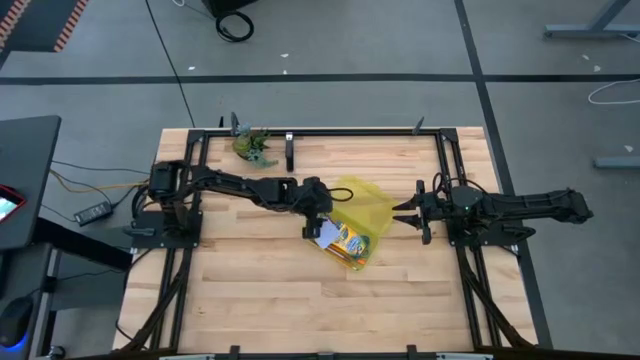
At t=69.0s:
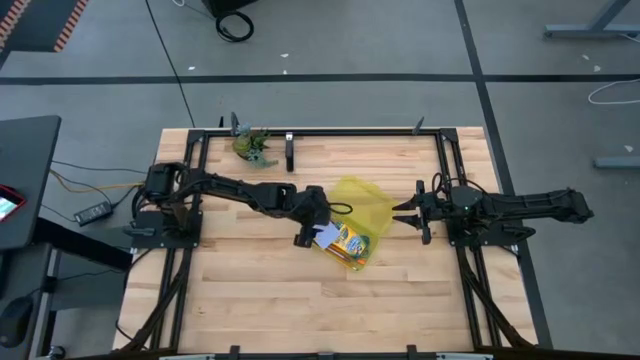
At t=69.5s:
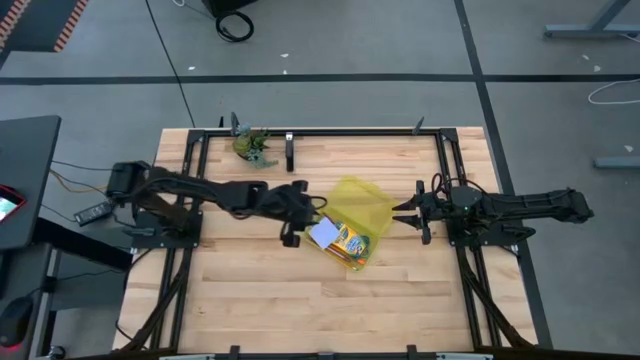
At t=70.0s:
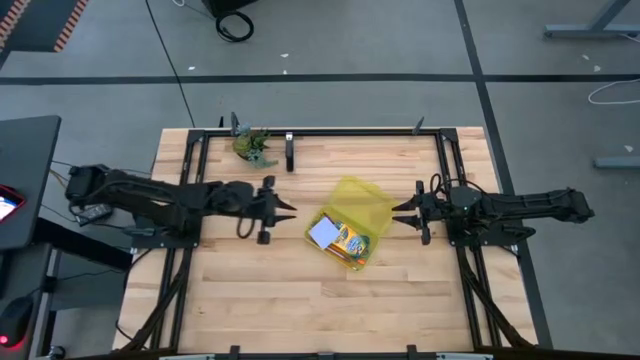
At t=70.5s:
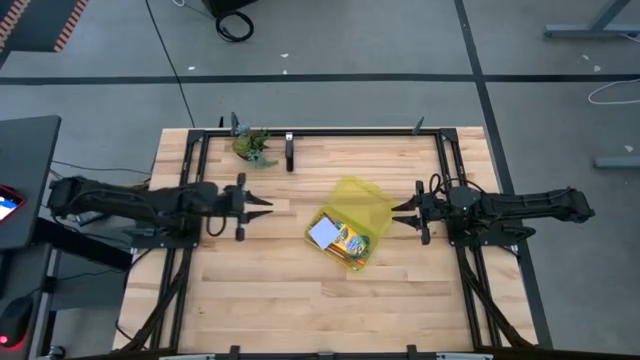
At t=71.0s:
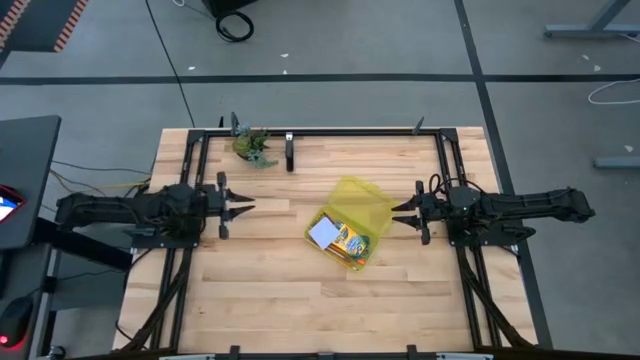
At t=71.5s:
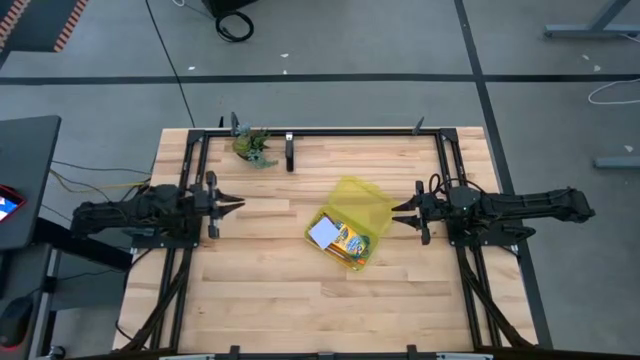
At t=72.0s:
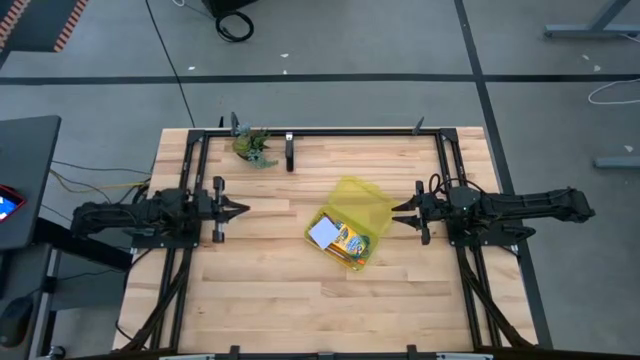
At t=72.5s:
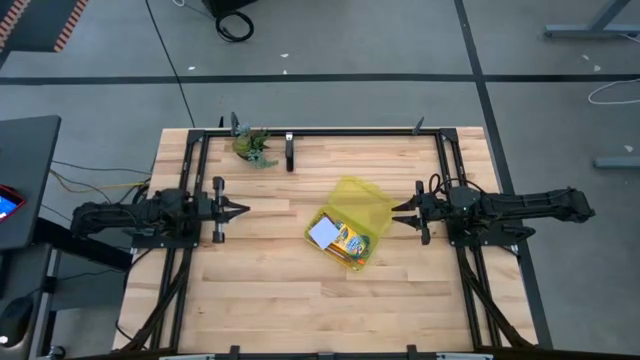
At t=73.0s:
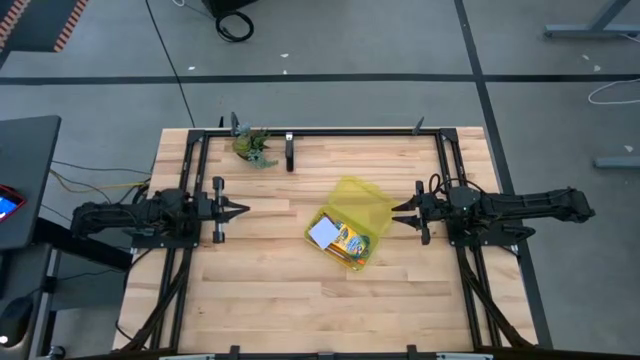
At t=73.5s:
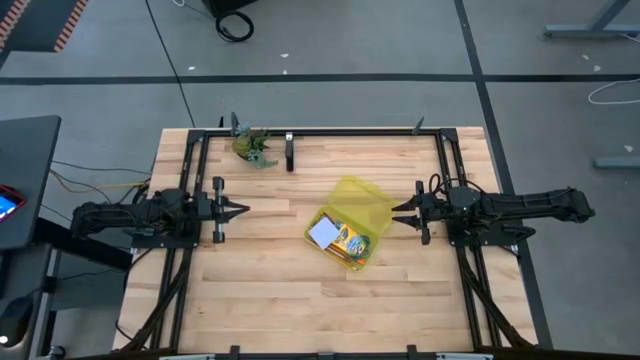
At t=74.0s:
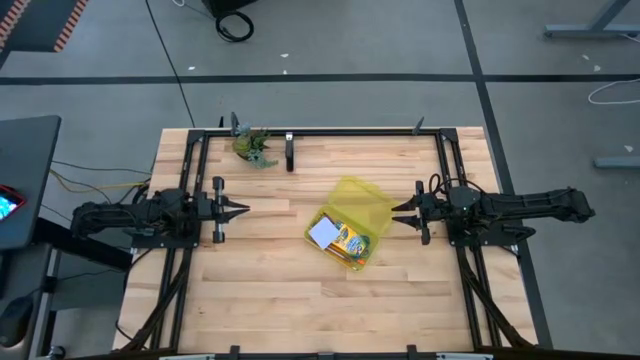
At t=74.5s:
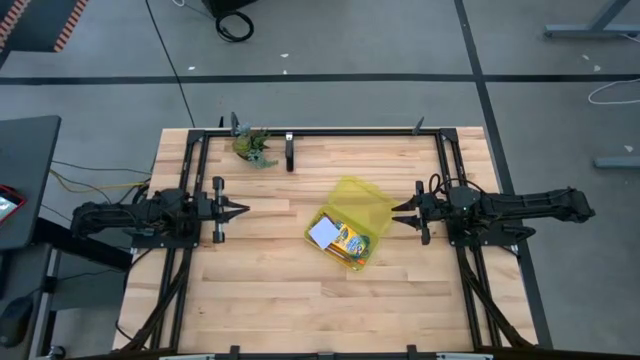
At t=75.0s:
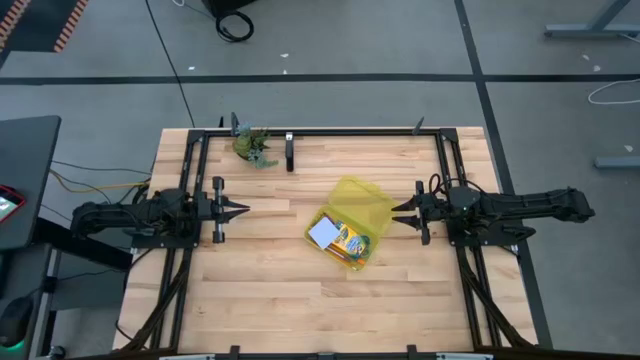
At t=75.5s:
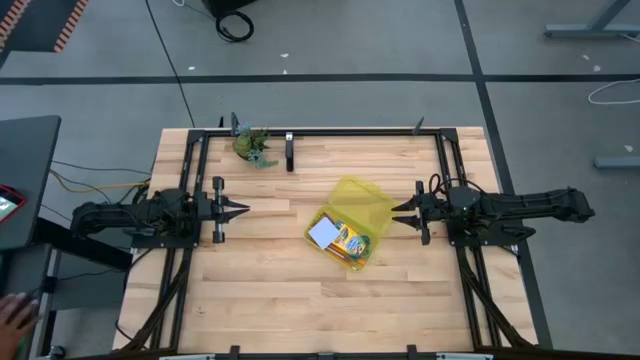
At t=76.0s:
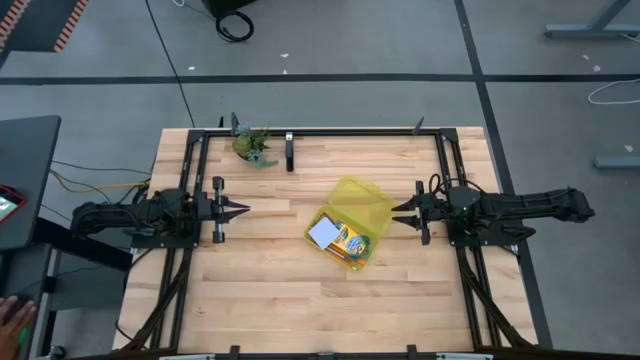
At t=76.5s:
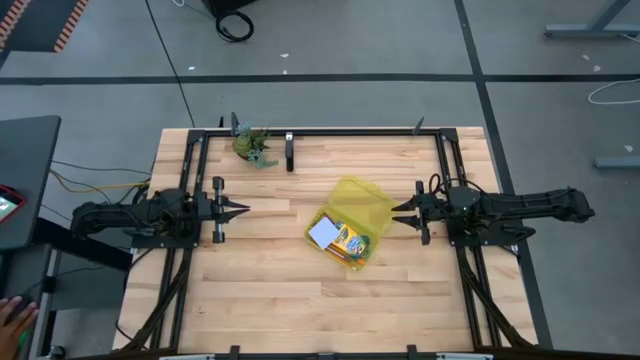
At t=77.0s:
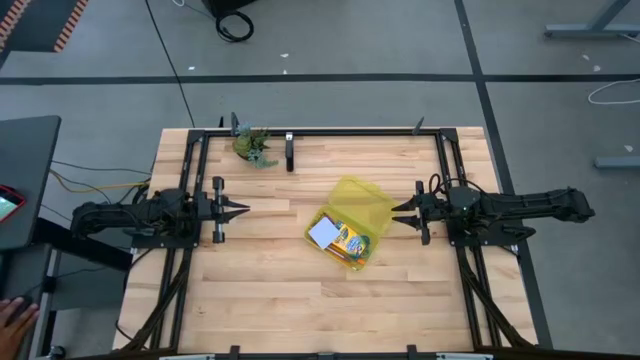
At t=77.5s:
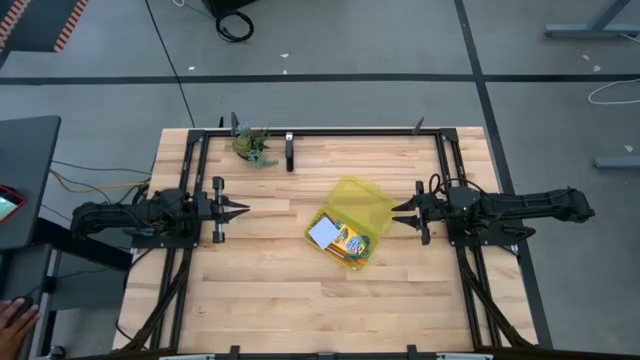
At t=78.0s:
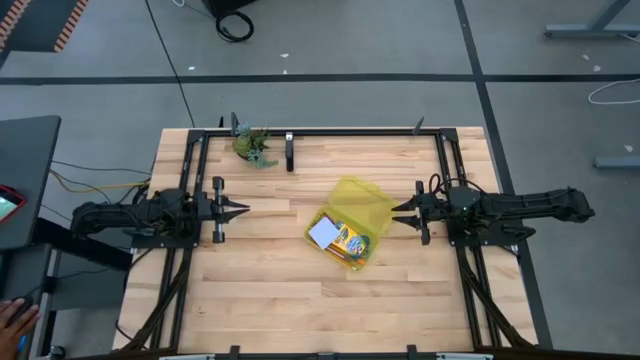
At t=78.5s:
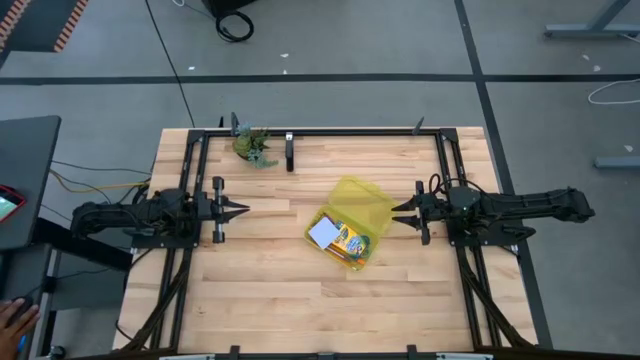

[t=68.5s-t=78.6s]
Task: Pack school essentials
Return to Home Position

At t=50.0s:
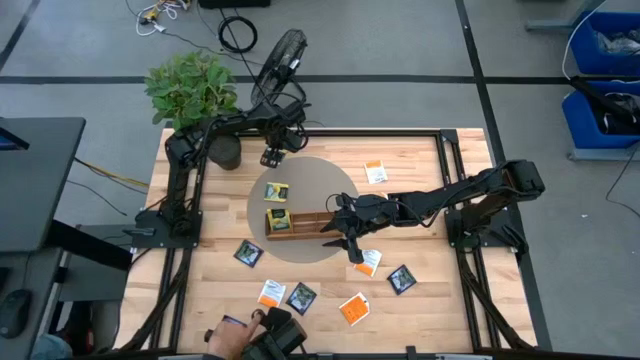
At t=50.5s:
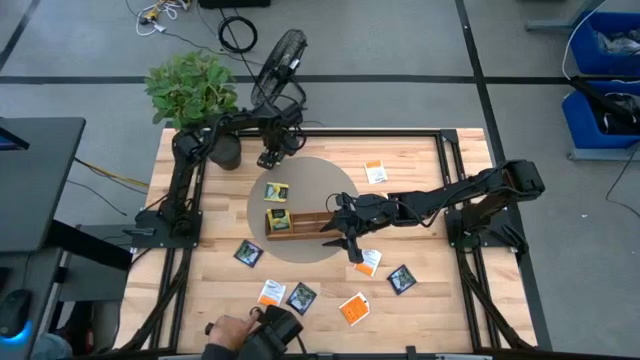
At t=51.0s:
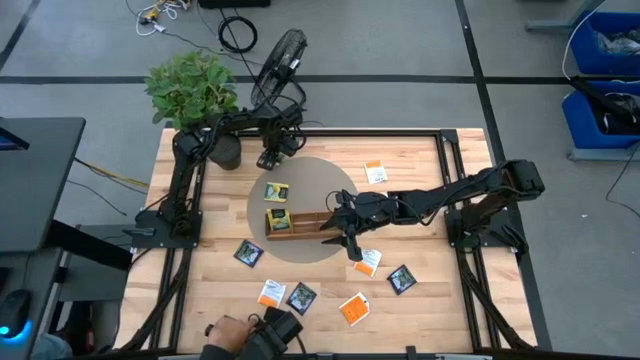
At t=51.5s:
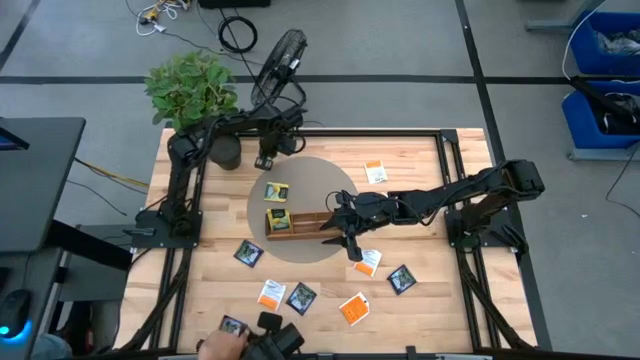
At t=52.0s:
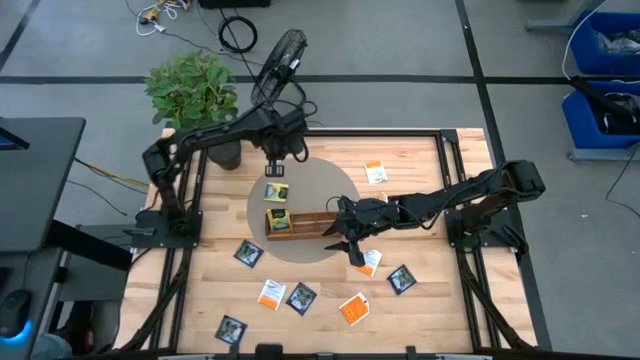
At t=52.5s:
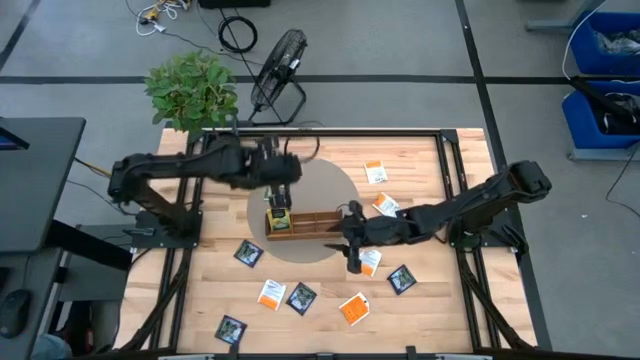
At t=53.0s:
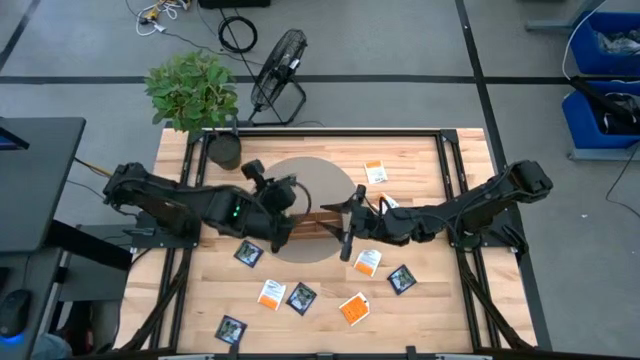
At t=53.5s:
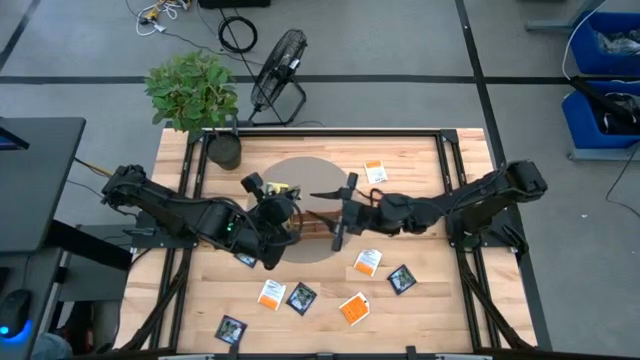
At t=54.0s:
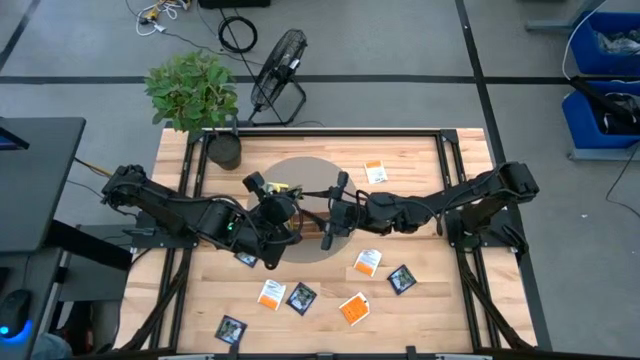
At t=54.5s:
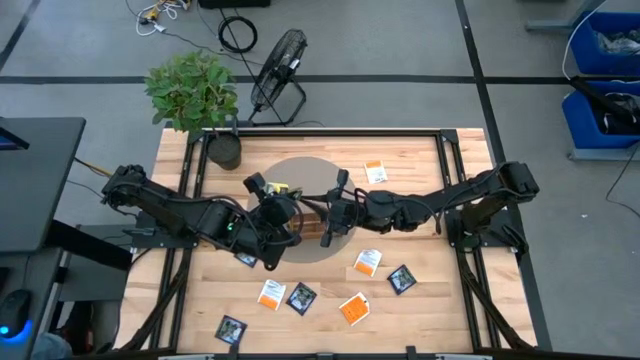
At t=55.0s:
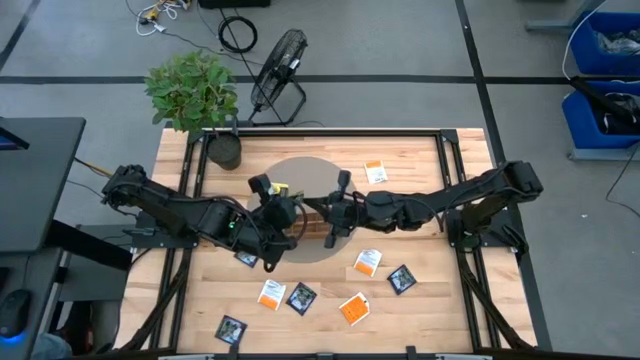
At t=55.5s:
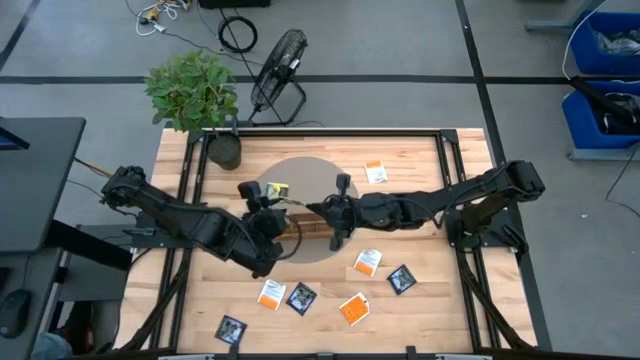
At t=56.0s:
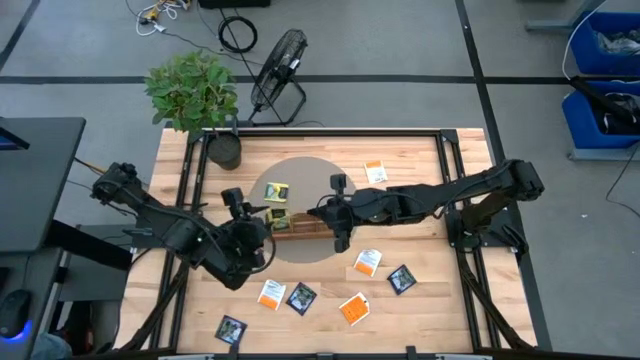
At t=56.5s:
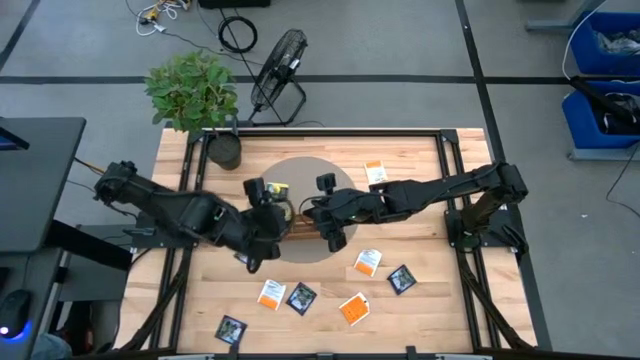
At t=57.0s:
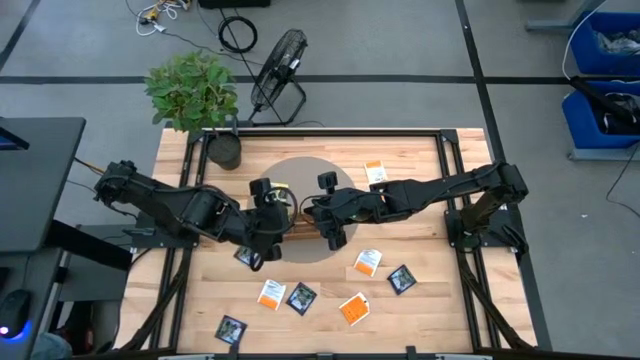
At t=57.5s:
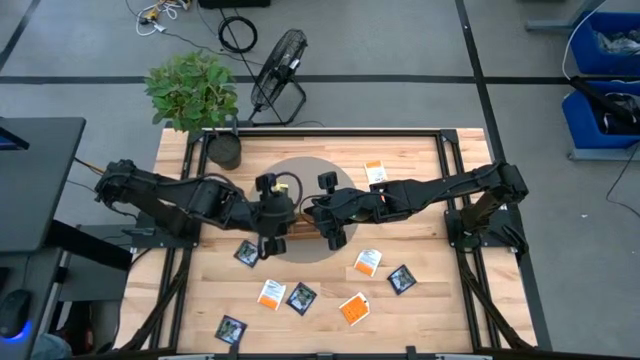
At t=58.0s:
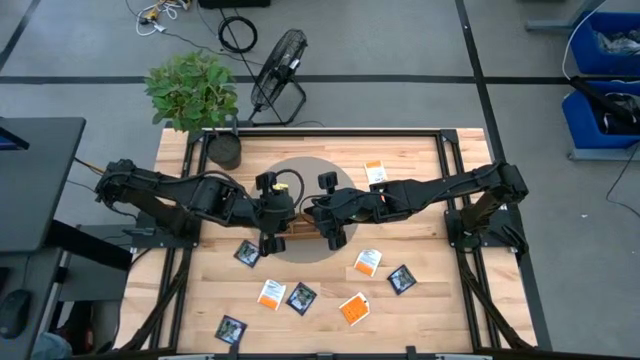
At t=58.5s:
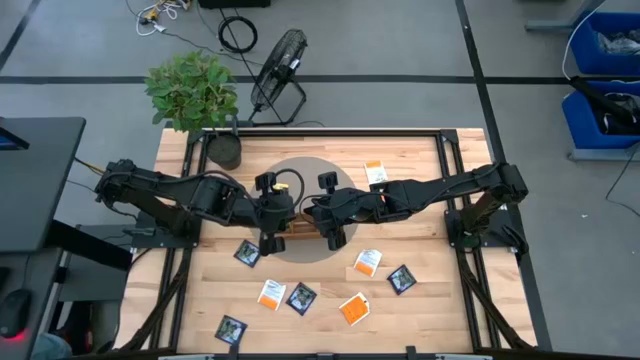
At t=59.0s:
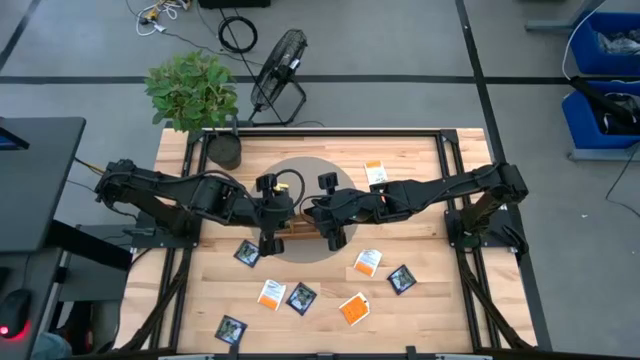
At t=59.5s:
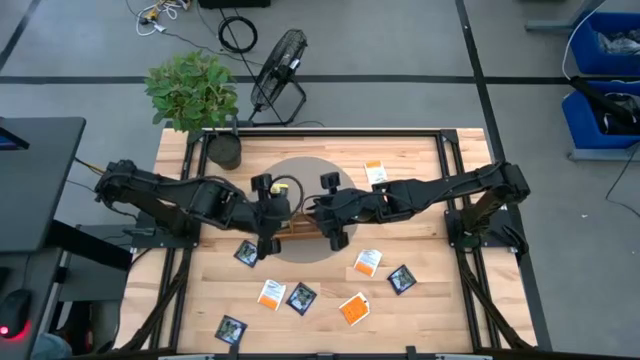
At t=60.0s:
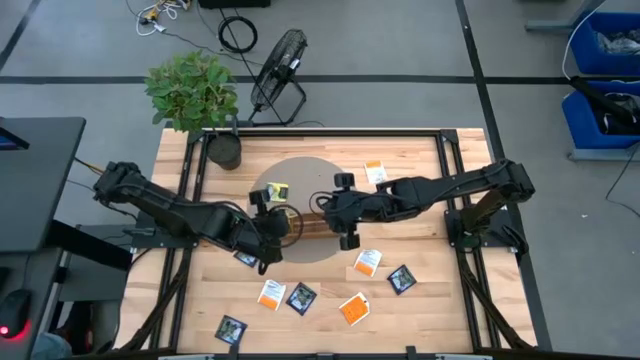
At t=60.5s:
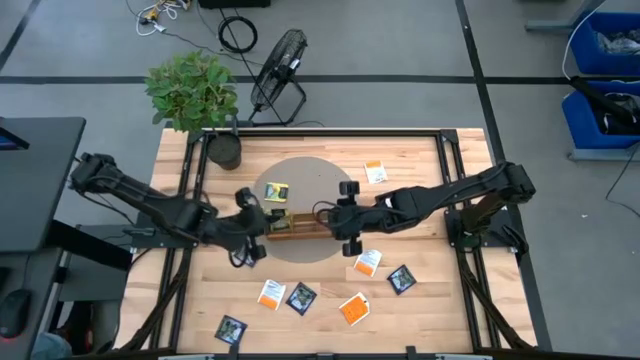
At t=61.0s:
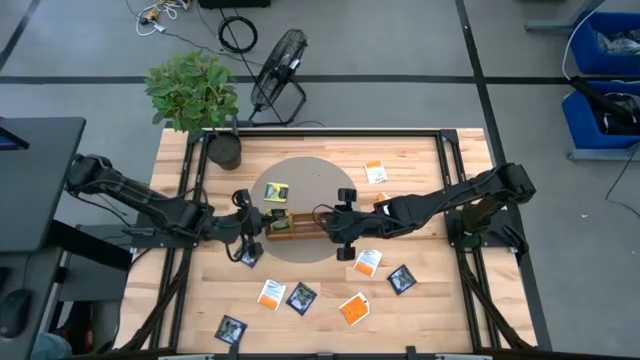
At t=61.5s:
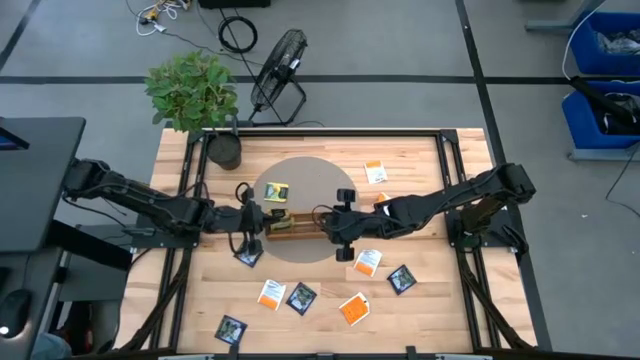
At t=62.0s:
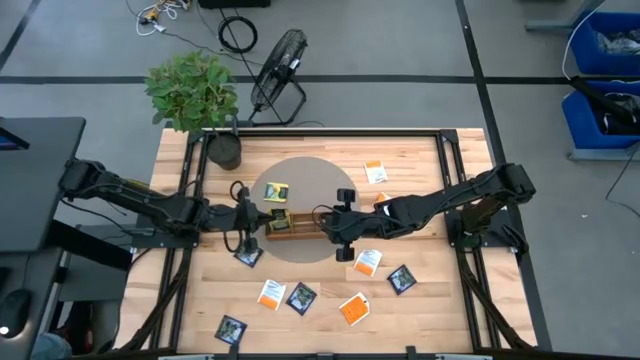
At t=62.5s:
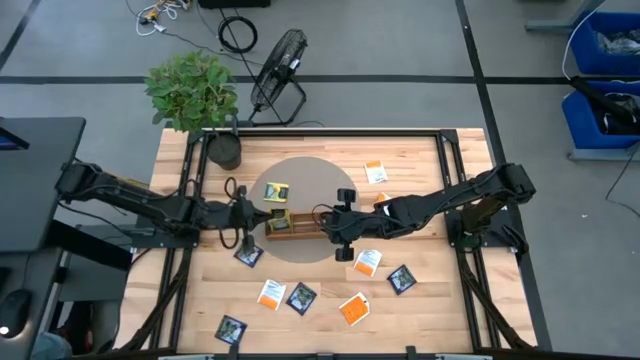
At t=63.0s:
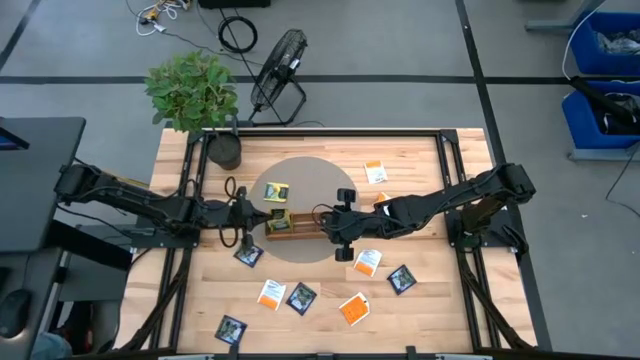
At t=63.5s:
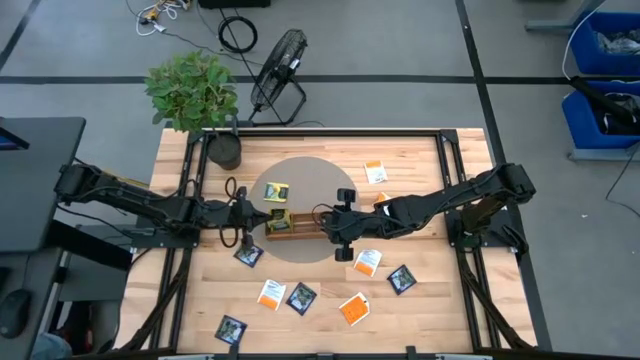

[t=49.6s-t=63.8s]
Task: Pick & Place Tea
Put the top yellow tea bag into the wooden organizer
